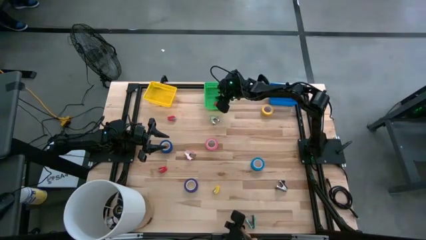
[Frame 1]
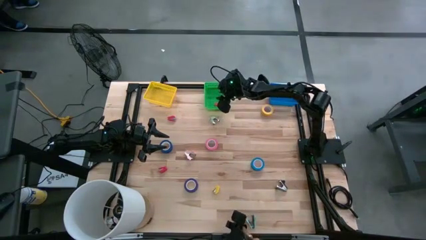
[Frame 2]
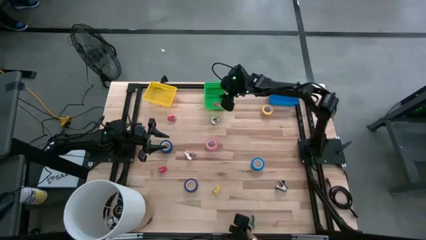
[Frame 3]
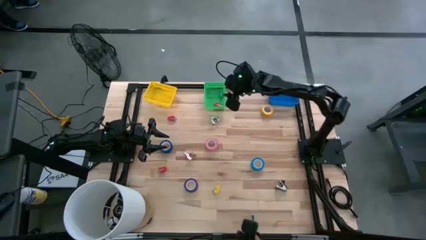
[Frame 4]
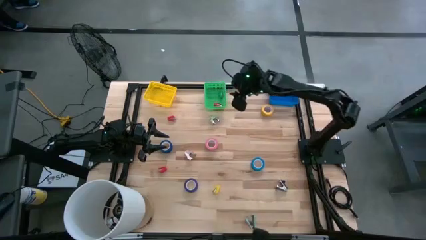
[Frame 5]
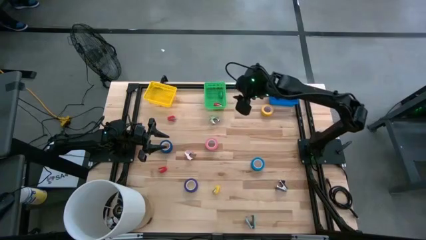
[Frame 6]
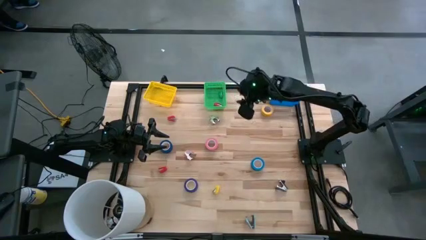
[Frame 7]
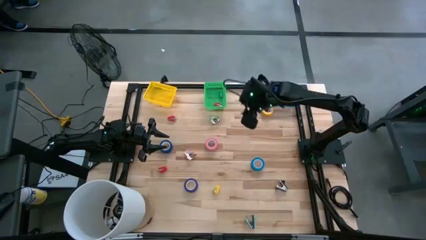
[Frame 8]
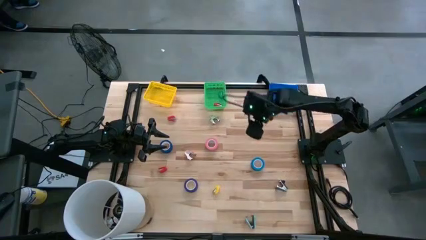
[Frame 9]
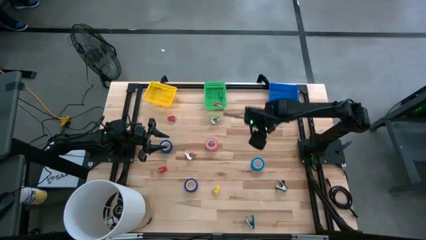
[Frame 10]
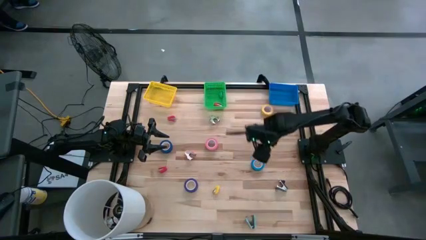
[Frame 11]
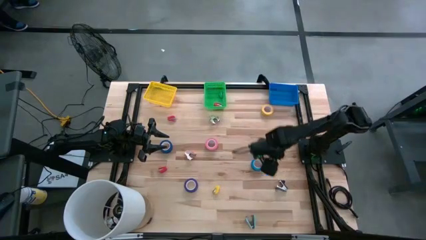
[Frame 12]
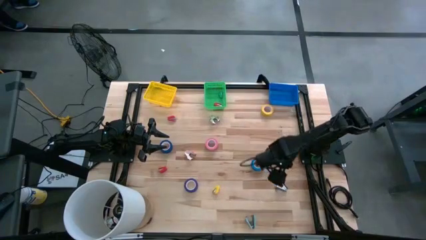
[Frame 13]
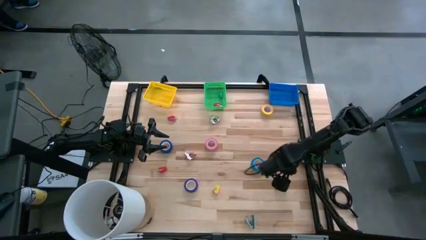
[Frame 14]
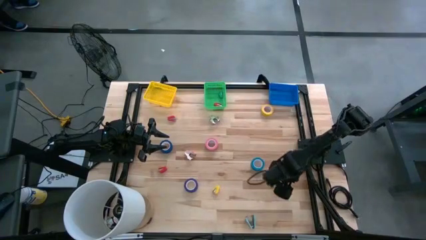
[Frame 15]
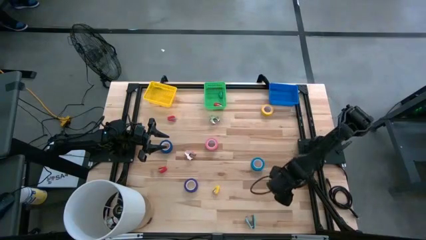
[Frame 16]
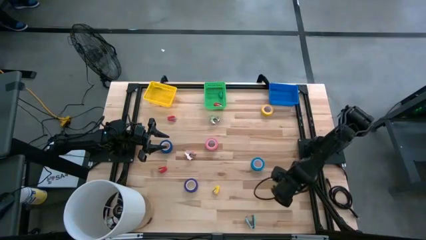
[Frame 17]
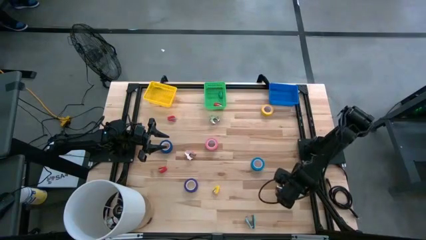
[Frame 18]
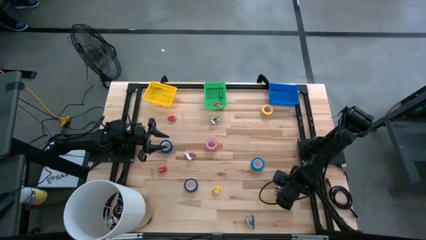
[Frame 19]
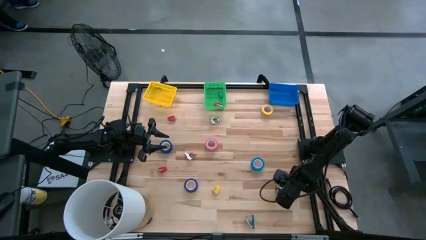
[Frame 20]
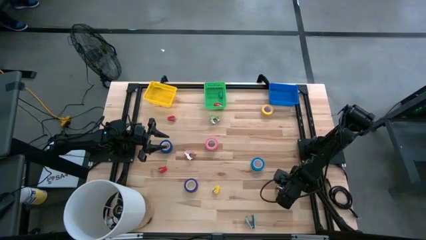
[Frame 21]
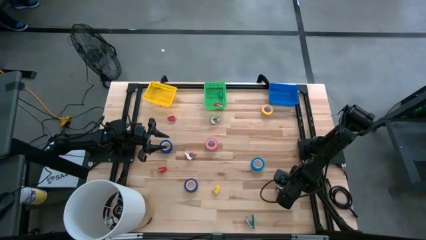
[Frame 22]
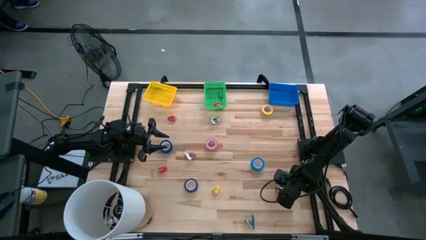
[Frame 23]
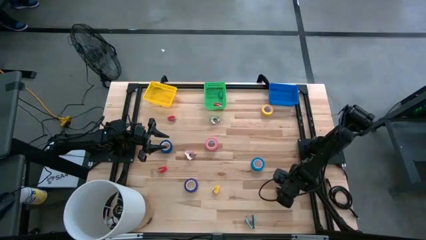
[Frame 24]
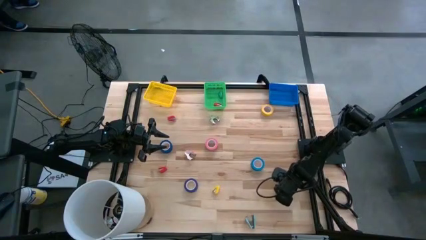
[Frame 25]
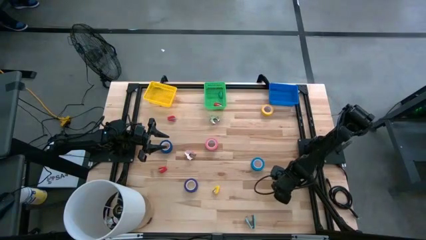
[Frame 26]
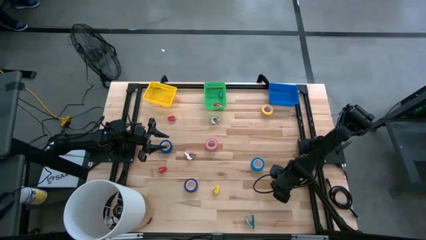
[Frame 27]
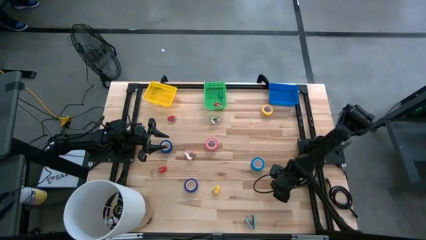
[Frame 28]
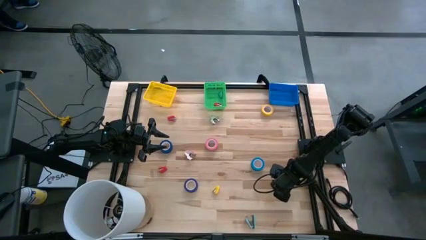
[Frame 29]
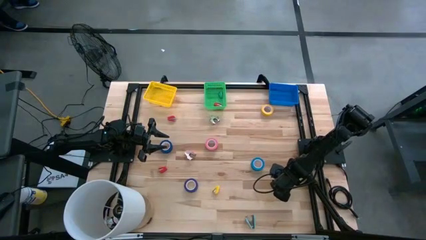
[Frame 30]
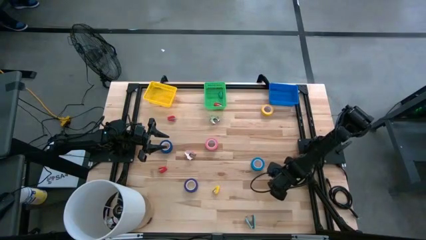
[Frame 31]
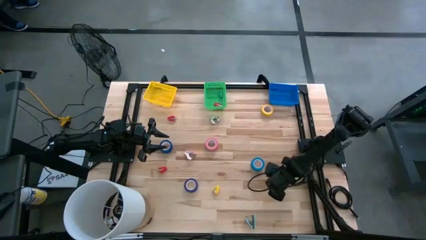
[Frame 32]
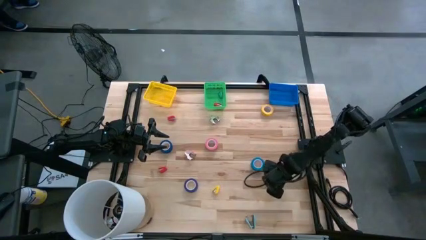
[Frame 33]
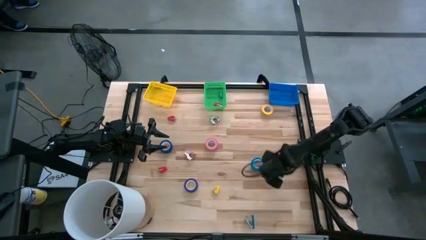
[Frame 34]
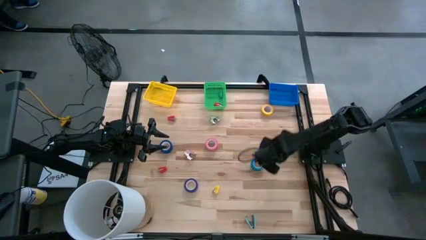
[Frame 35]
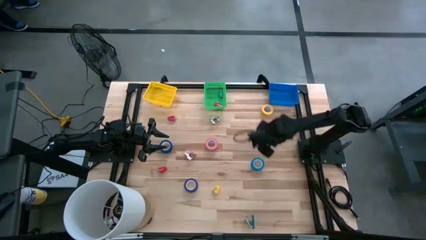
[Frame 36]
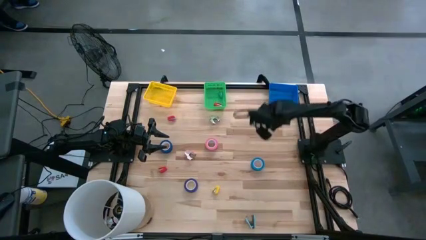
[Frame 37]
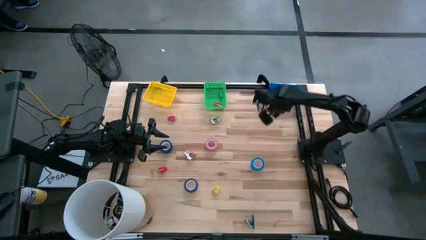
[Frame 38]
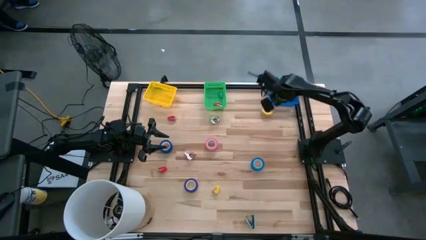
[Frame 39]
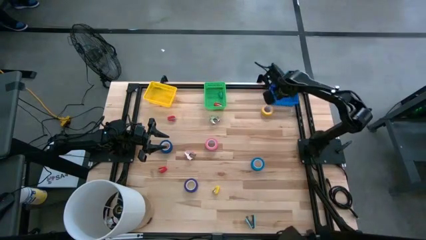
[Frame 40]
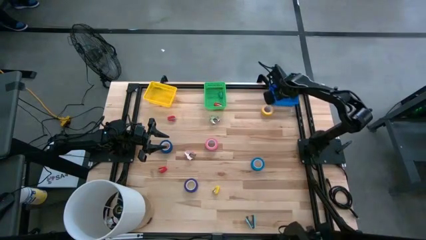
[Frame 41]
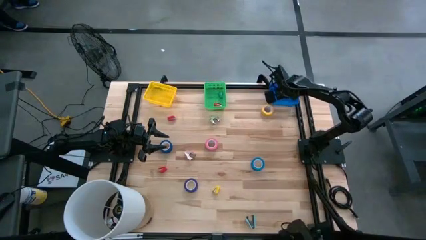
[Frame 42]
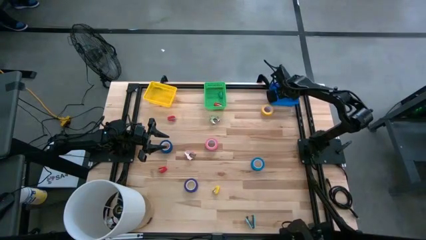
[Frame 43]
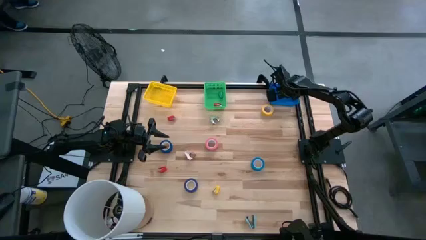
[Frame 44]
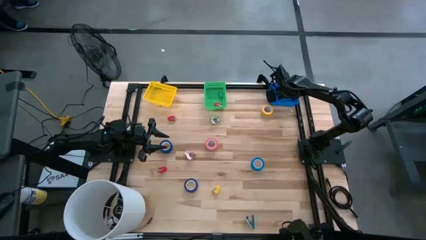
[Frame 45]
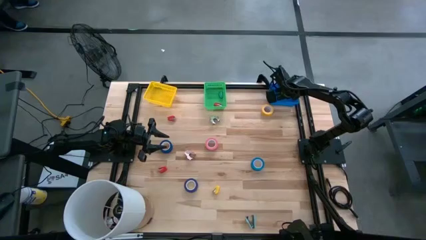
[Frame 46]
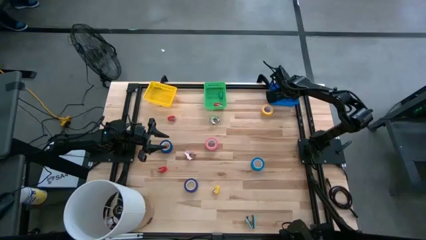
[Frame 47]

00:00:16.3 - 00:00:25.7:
Task: Pick and place Stapler, Stapler remover, tape
Put the gray staple remover into the blue basket

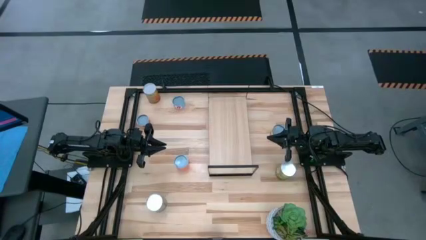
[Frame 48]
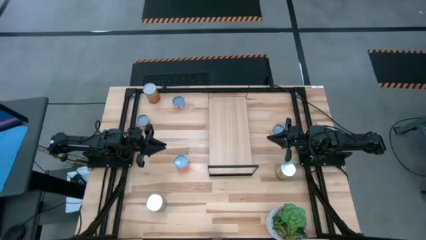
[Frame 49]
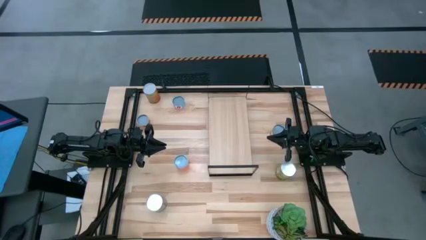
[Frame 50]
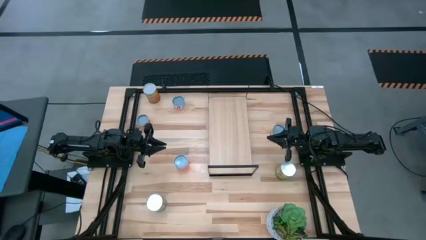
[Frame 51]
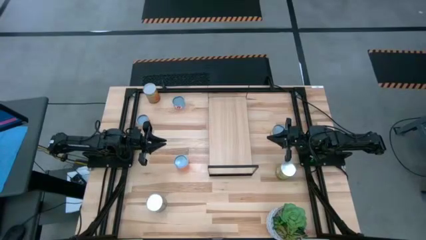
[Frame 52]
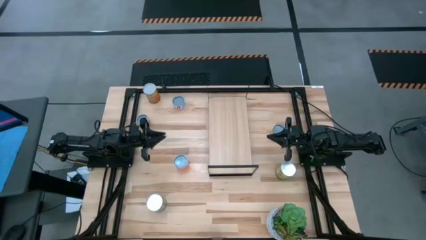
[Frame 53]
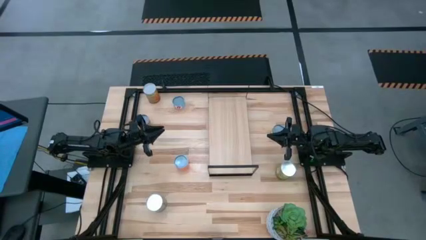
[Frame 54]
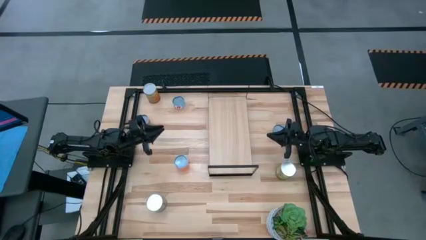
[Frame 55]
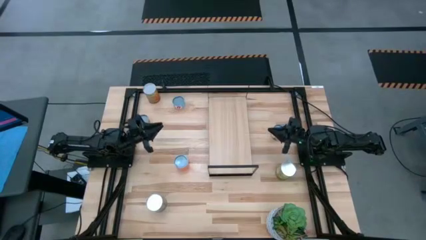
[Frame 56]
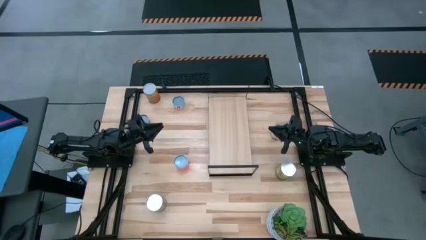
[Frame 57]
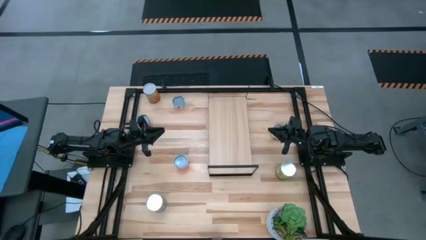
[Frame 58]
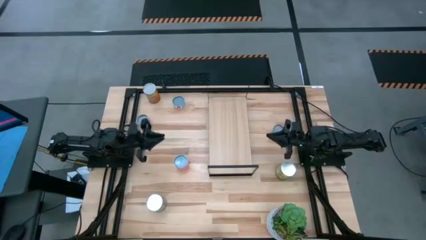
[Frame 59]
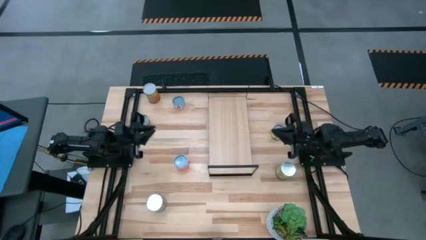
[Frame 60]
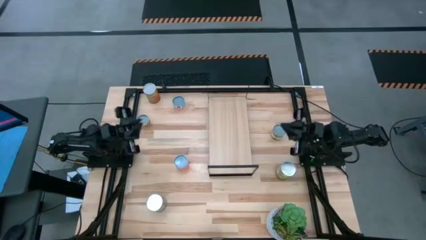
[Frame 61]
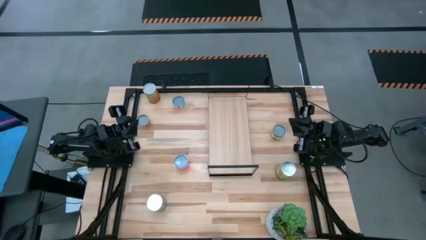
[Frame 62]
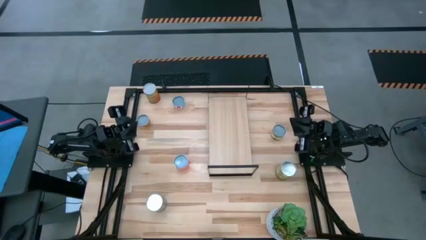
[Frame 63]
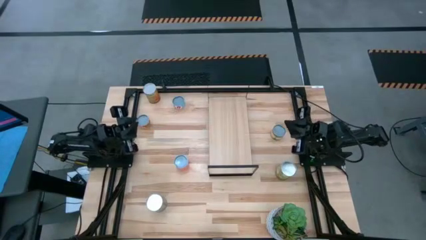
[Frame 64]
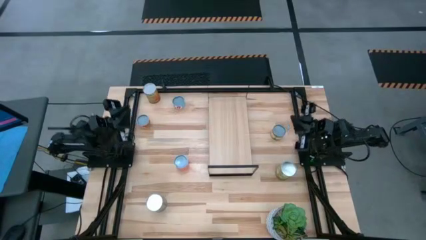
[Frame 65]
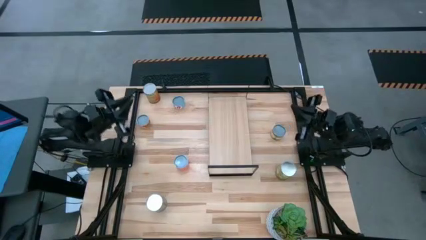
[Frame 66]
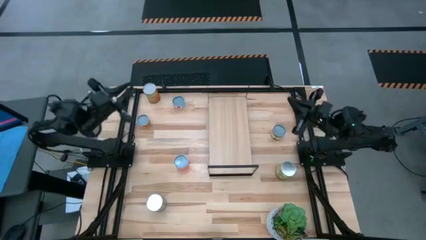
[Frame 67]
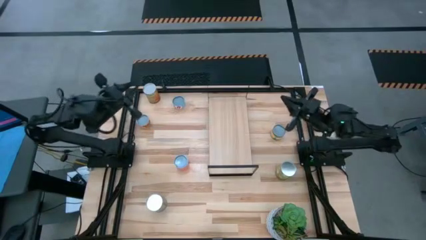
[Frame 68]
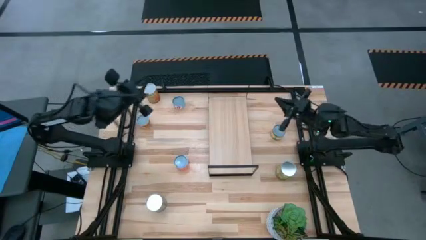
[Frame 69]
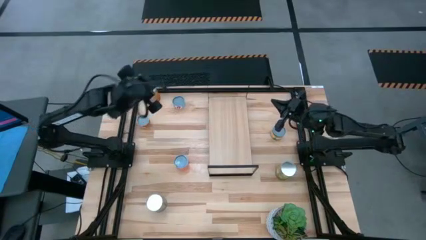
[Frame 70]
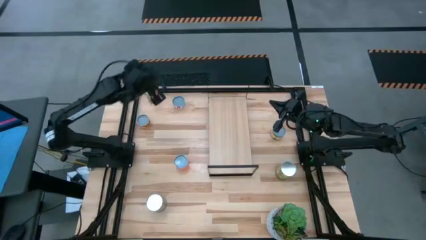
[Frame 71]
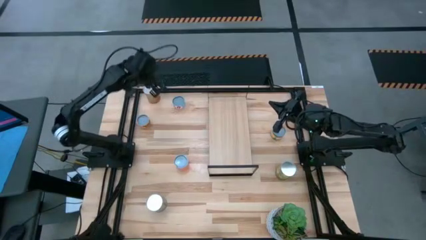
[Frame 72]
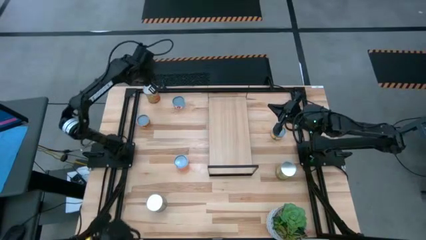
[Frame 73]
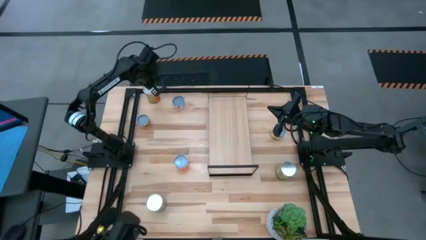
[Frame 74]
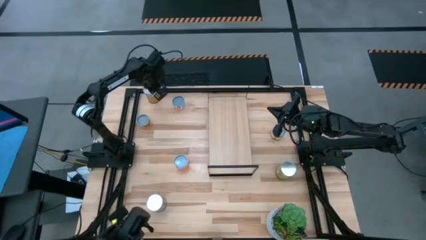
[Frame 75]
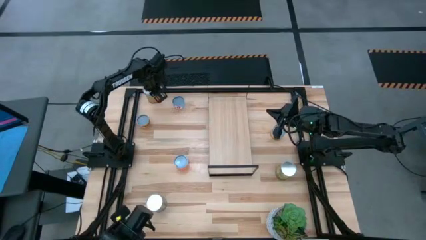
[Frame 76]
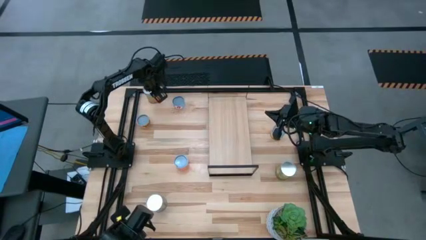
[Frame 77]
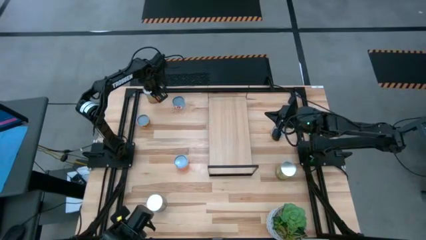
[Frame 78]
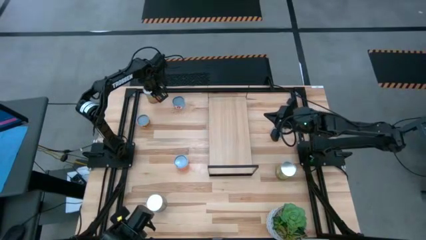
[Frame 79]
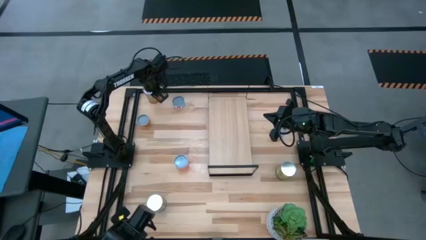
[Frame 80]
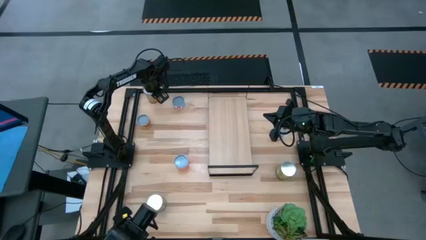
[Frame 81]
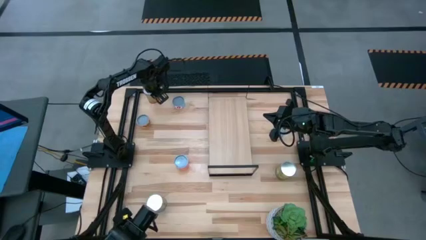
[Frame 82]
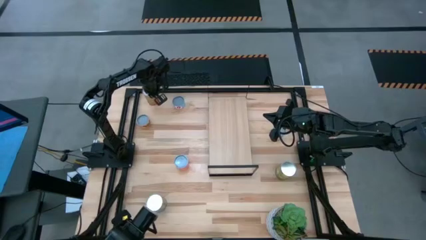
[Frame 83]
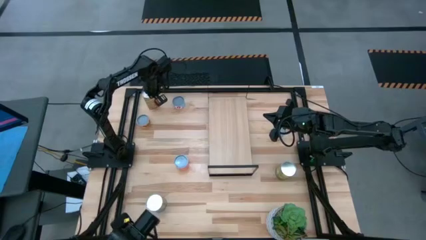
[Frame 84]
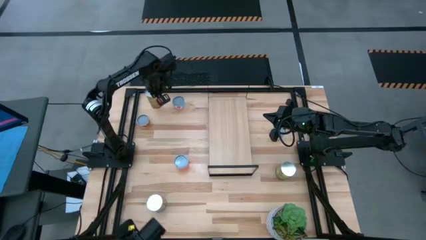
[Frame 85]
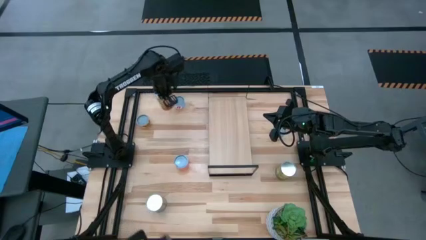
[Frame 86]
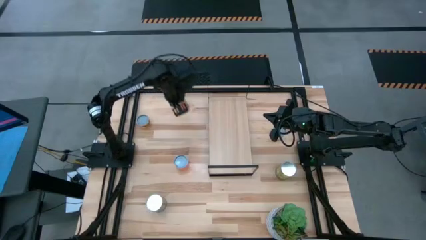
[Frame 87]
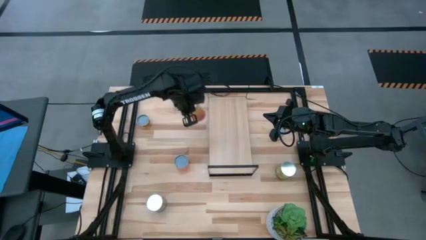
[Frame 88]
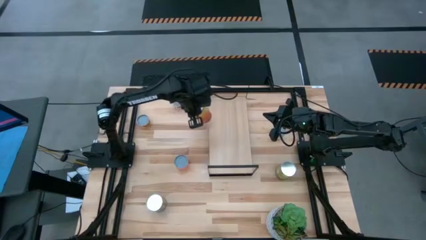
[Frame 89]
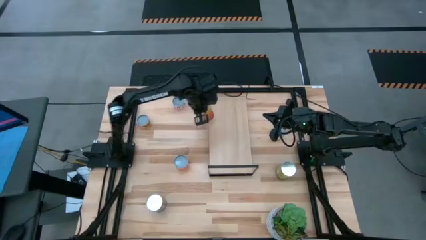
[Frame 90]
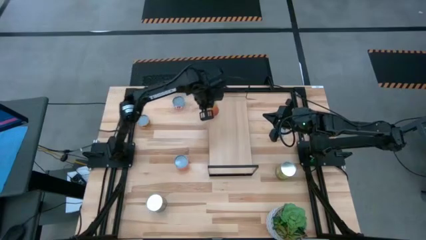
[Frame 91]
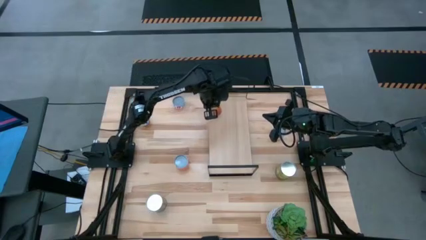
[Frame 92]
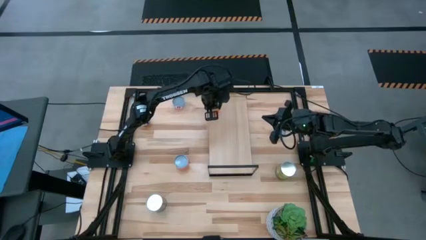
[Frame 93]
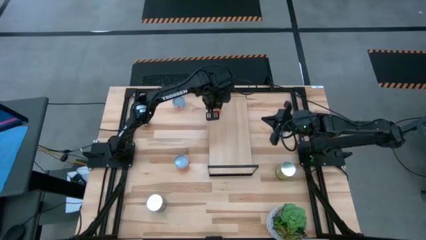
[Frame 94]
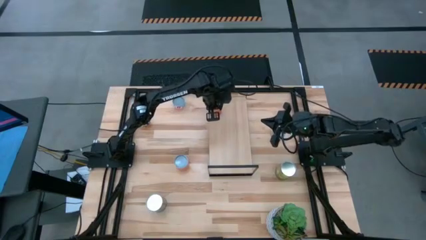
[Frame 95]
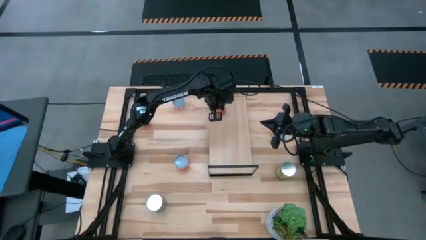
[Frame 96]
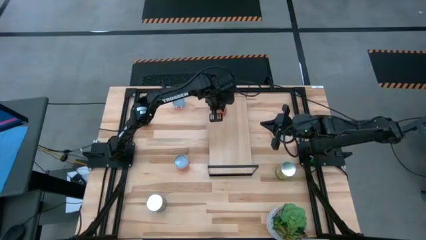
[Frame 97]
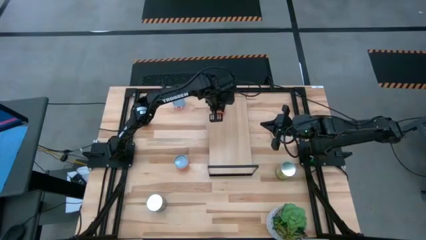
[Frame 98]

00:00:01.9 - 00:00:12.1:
Task: Pick and place cans onto a shelf
Put the canned green beans on the shelf
